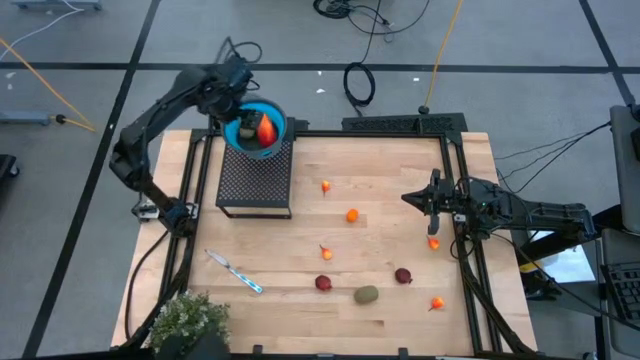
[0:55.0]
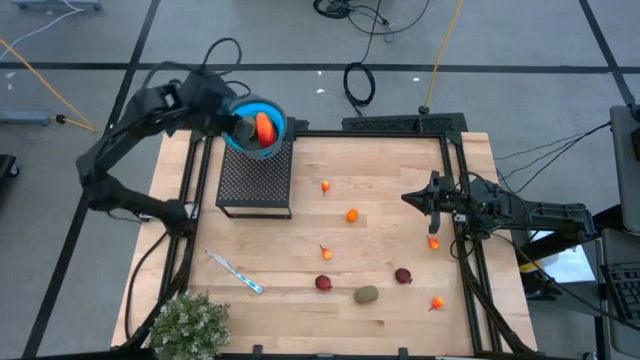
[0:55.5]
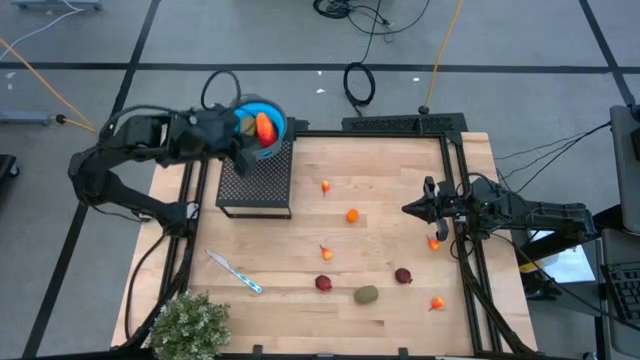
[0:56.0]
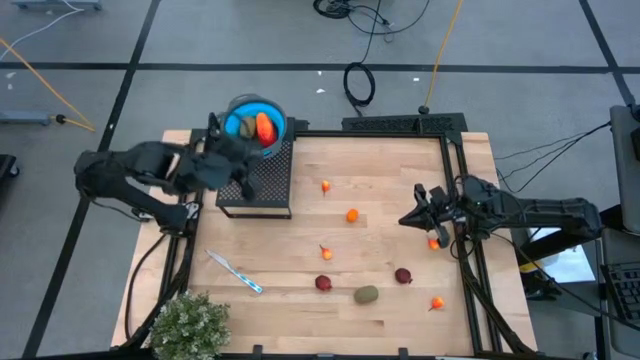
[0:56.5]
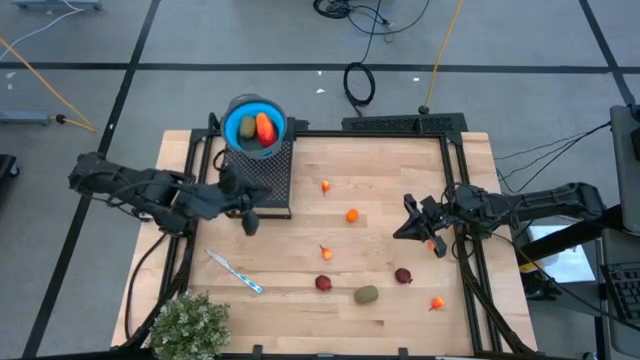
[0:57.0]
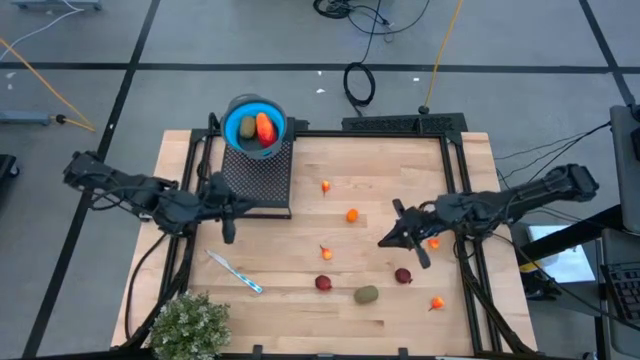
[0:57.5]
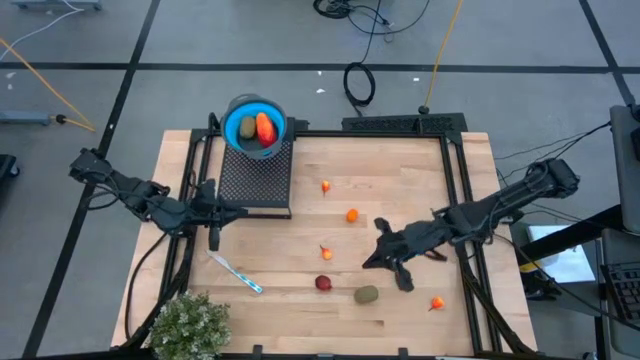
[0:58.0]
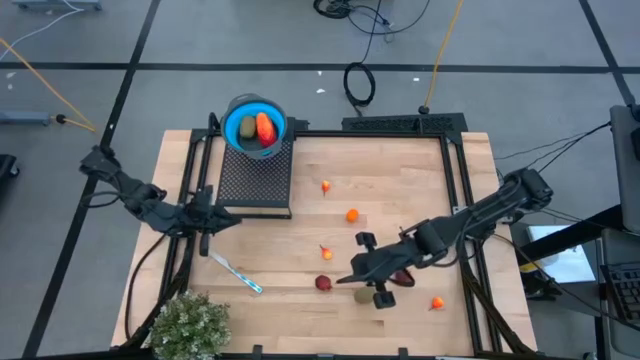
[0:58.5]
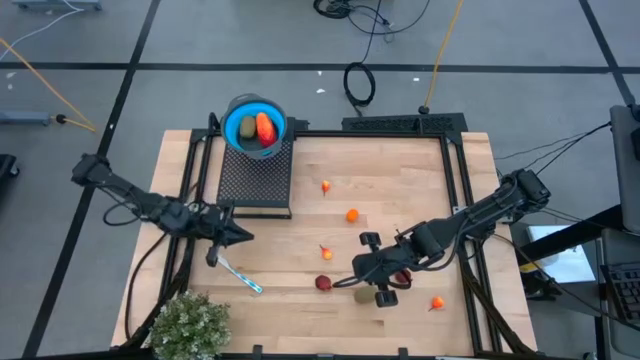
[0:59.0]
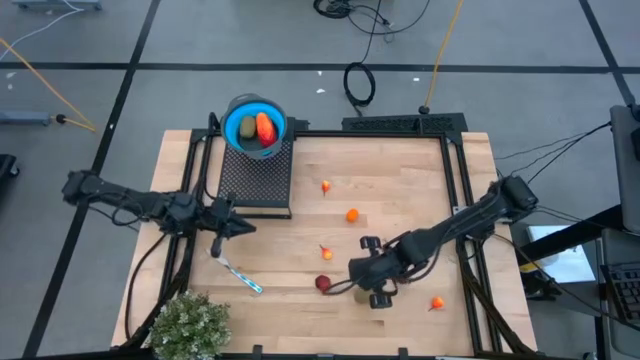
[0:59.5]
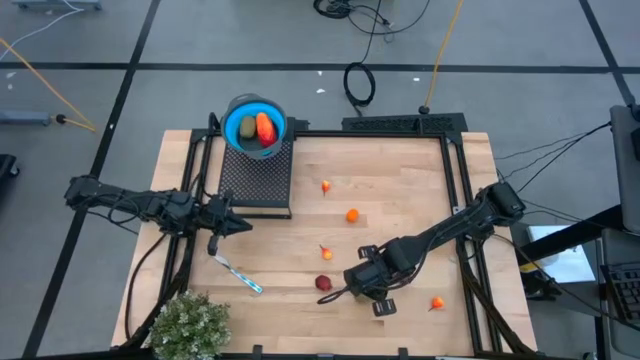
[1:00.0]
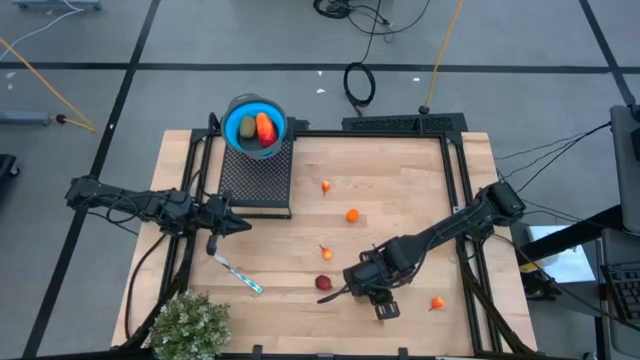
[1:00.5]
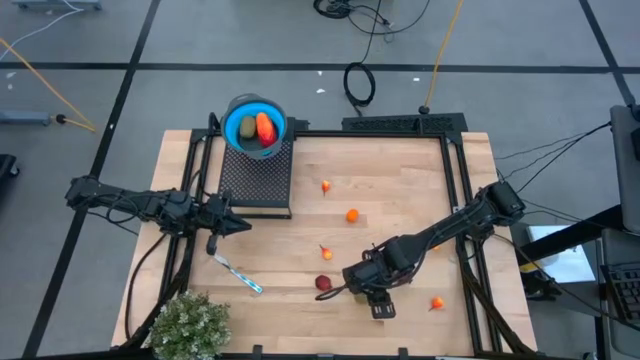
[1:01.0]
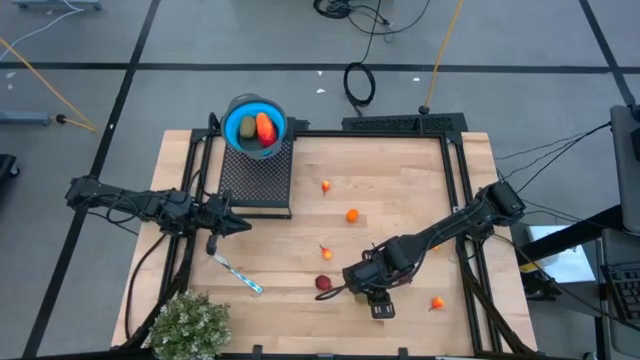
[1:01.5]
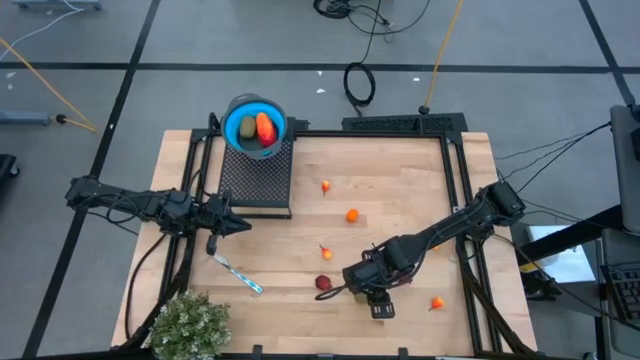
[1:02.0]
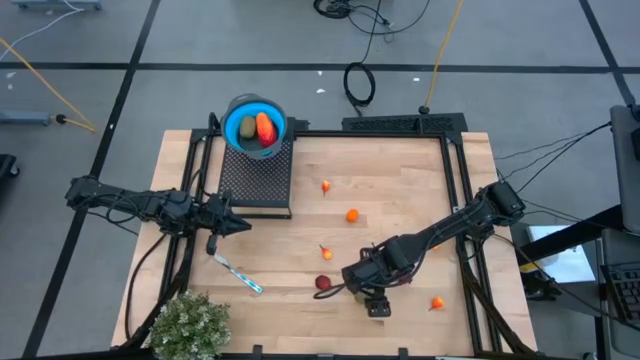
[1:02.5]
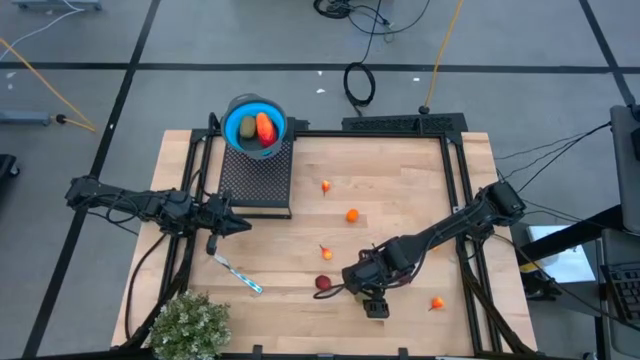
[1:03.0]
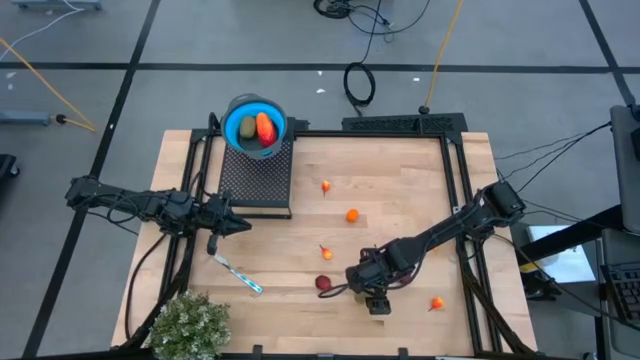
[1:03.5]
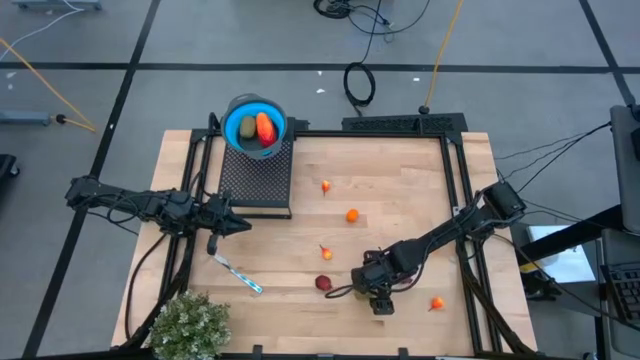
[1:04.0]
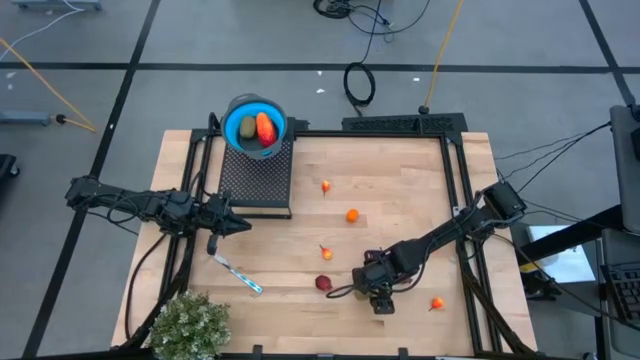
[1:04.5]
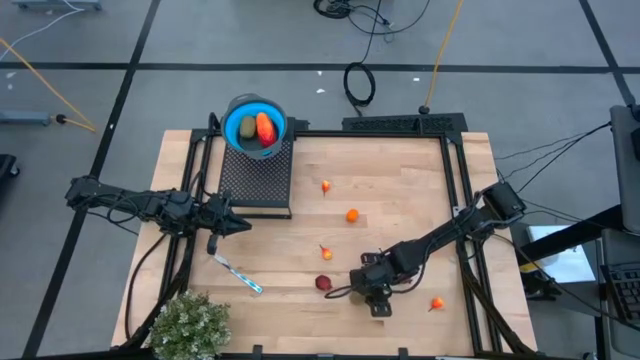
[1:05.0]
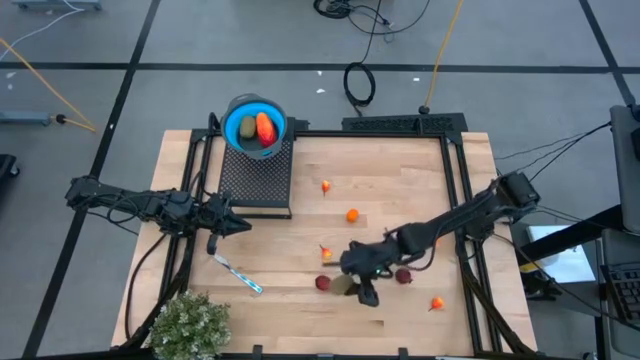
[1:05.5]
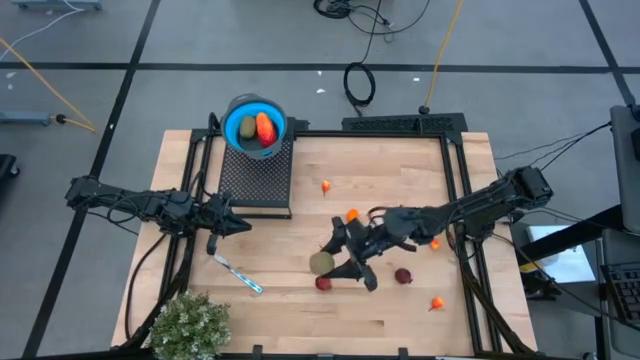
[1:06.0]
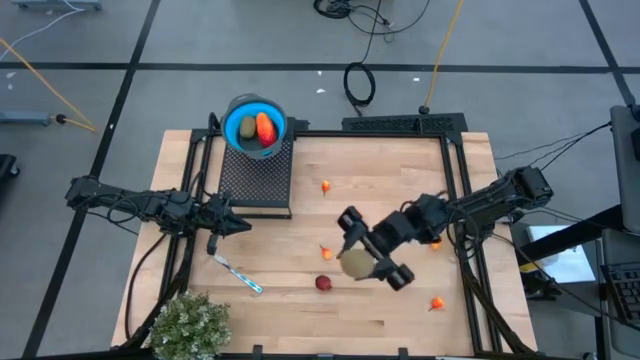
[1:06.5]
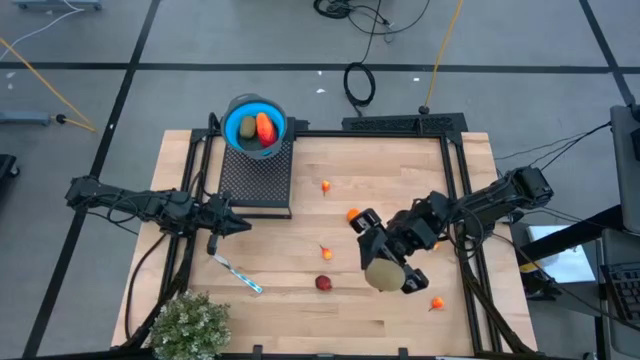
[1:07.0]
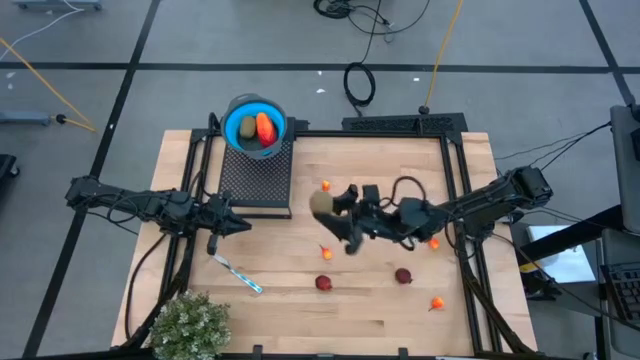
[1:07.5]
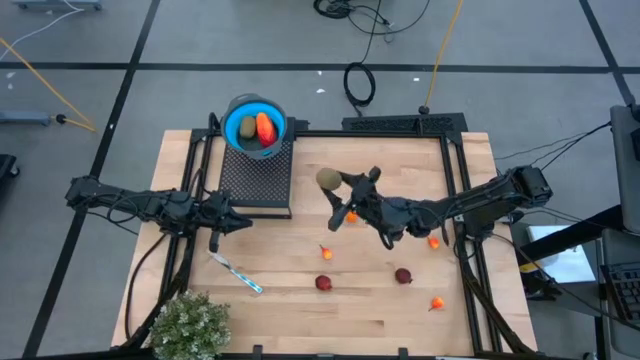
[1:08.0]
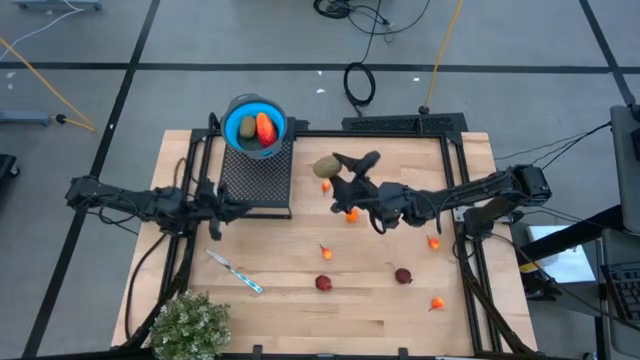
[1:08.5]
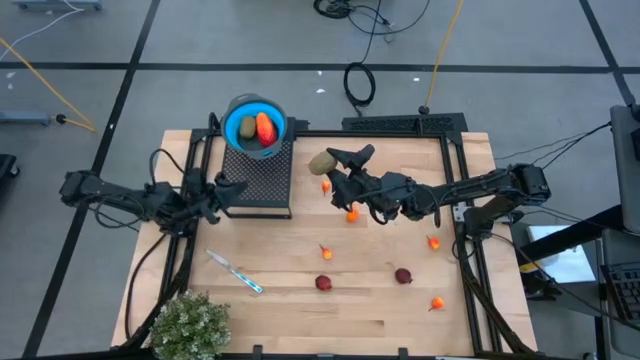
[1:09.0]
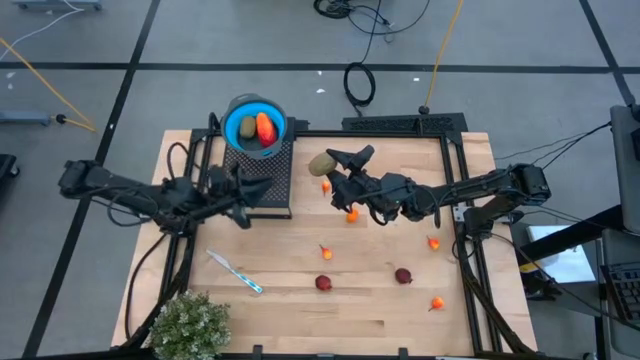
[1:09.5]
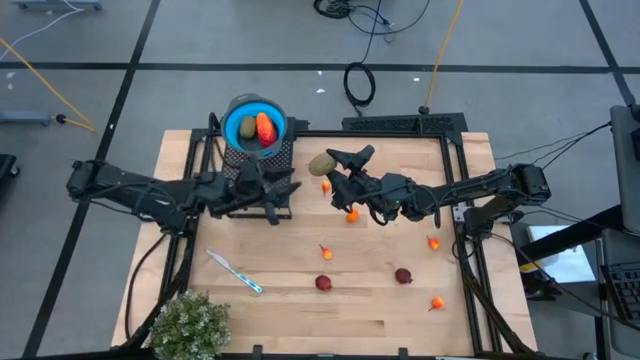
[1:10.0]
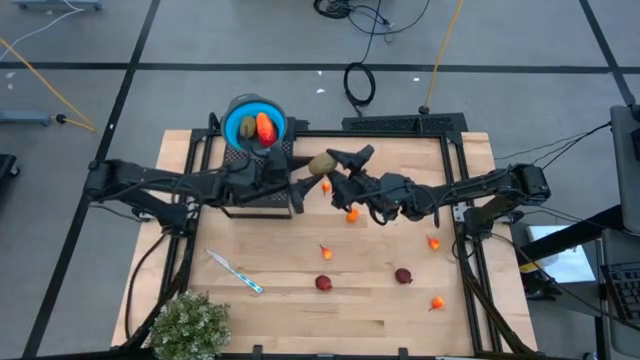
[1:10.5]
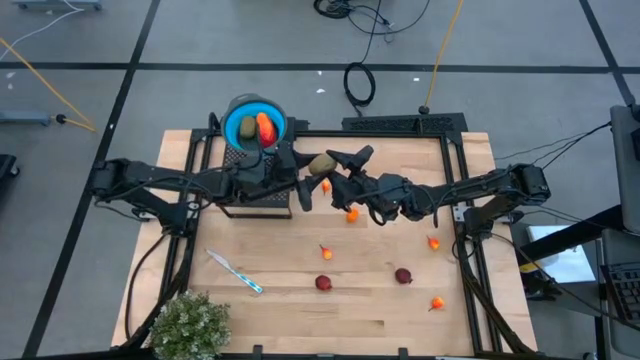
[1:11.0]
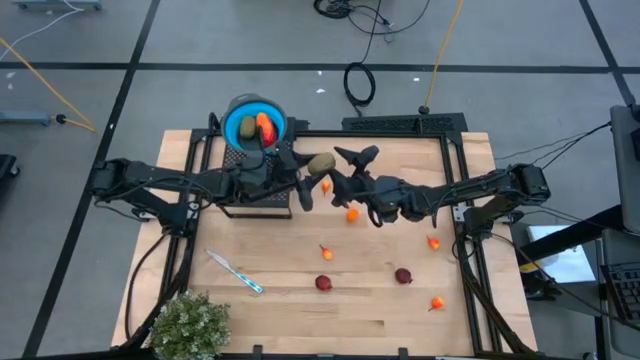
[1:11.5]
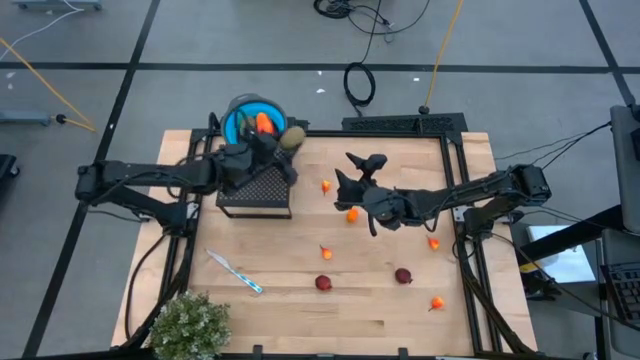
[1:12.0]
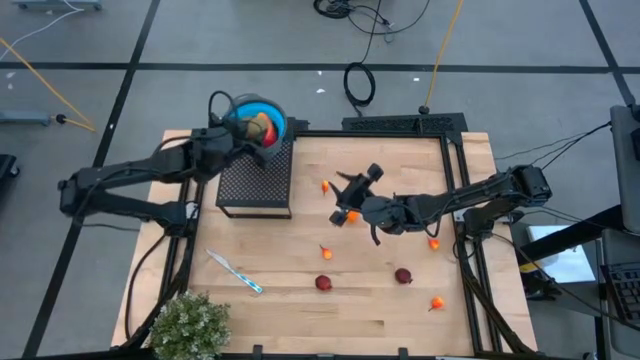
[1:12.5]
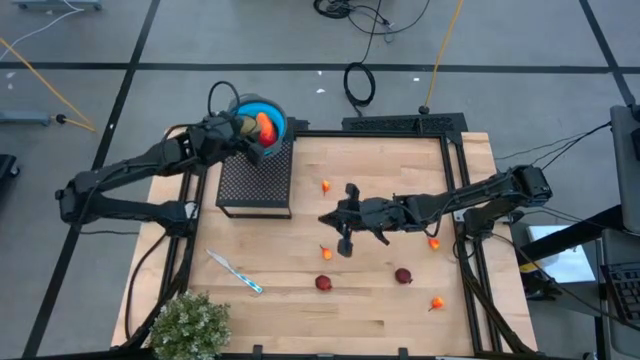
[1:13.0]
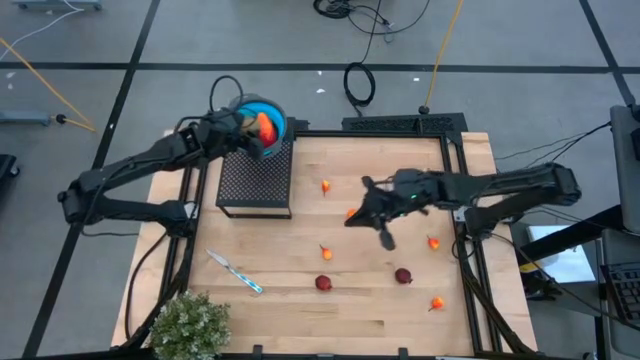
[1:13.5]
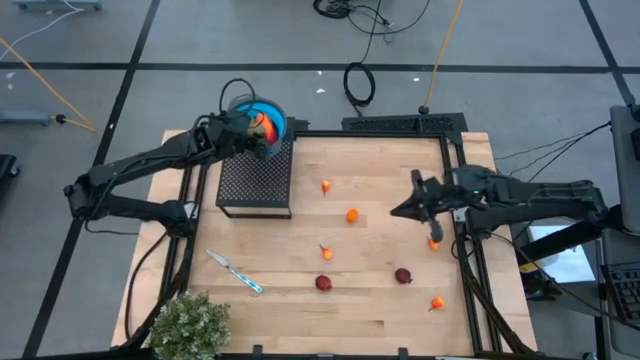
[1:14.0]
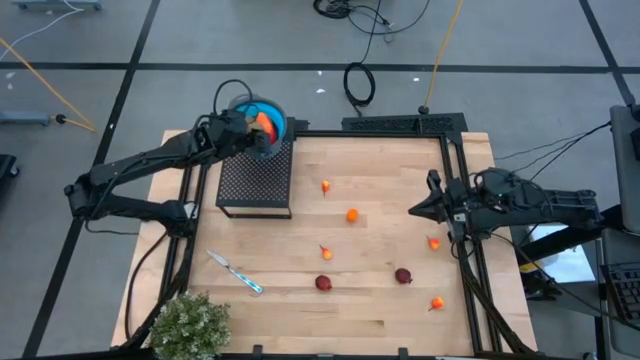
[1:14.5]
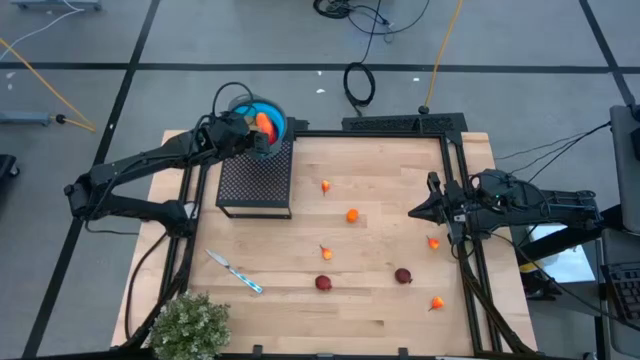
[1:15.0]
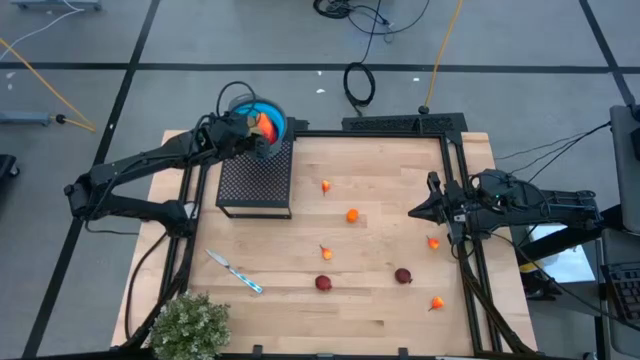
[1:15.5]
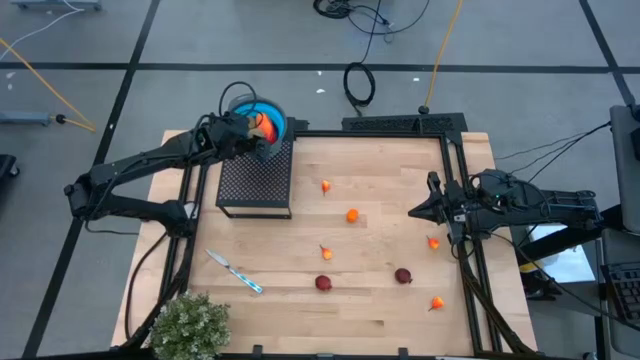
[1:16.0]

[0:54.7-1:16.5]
Task: Pick & Place Fruit
Put the kiwi into the blue strainer bowl on the shelf
